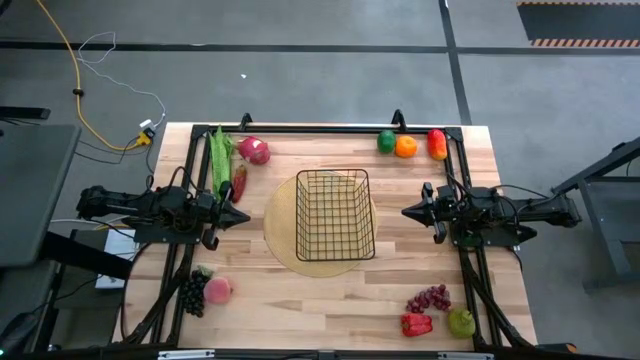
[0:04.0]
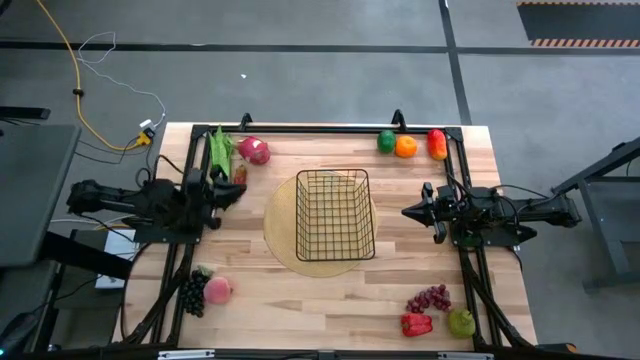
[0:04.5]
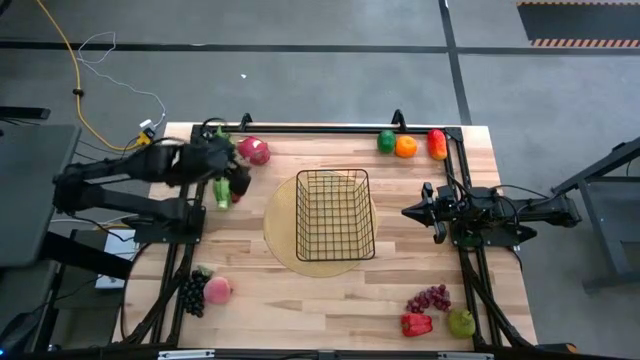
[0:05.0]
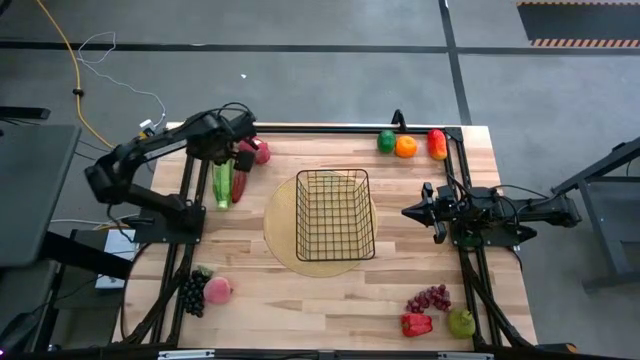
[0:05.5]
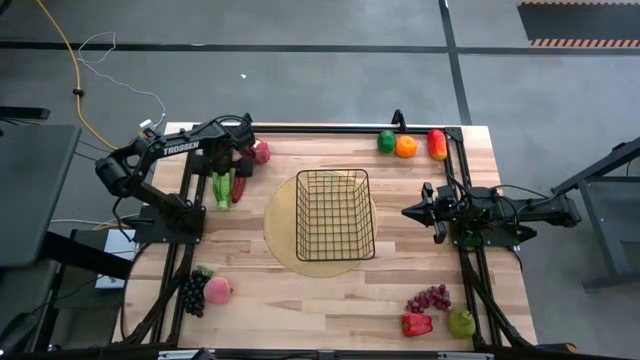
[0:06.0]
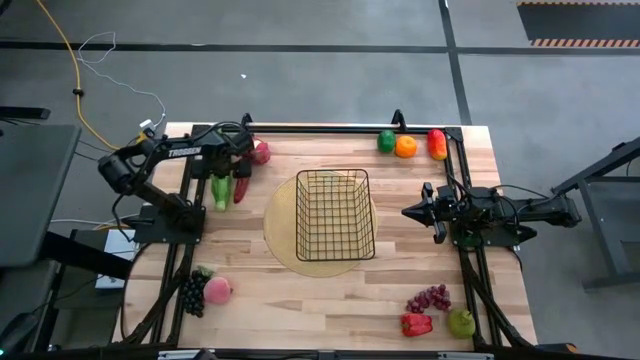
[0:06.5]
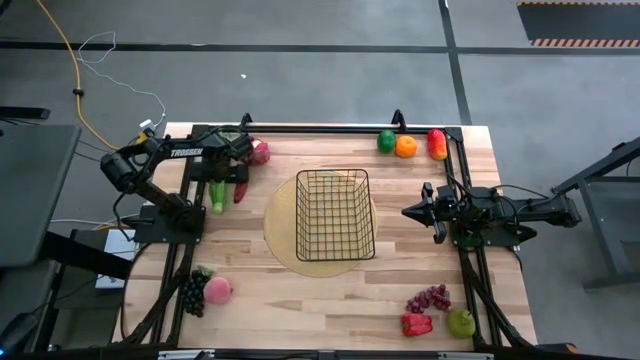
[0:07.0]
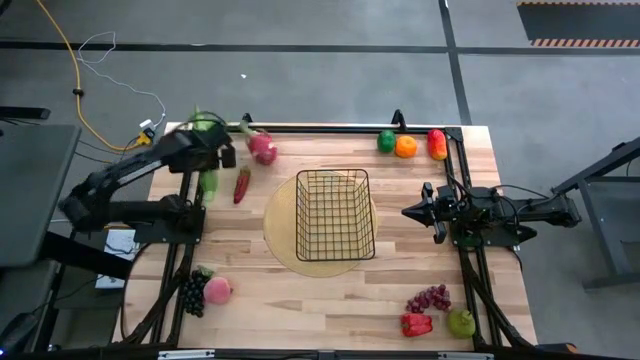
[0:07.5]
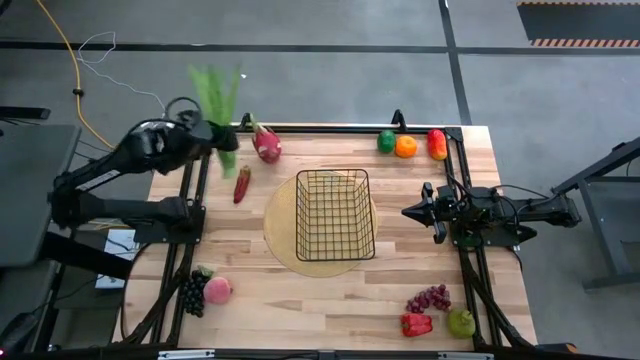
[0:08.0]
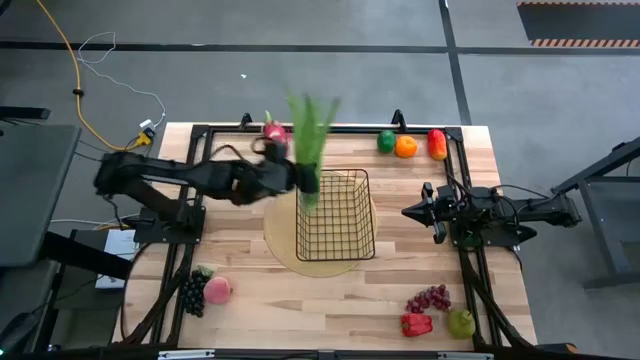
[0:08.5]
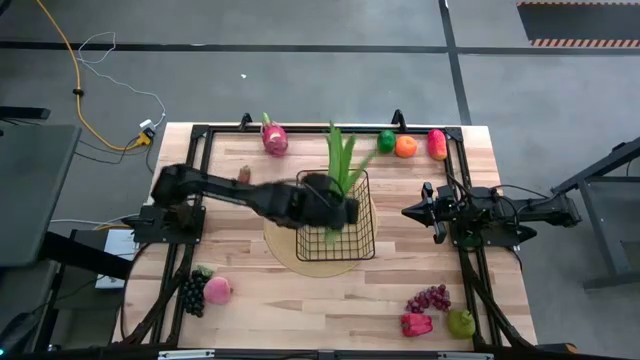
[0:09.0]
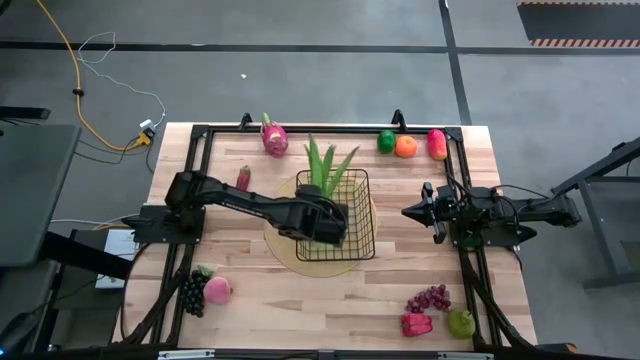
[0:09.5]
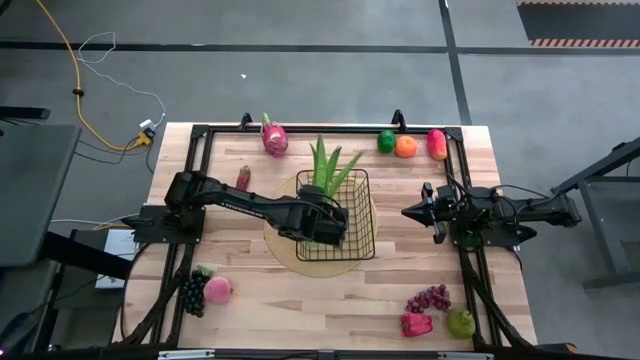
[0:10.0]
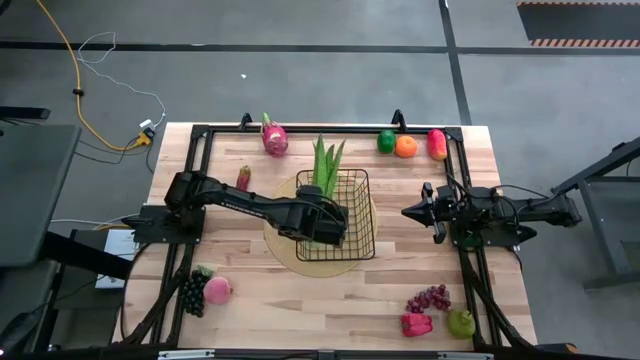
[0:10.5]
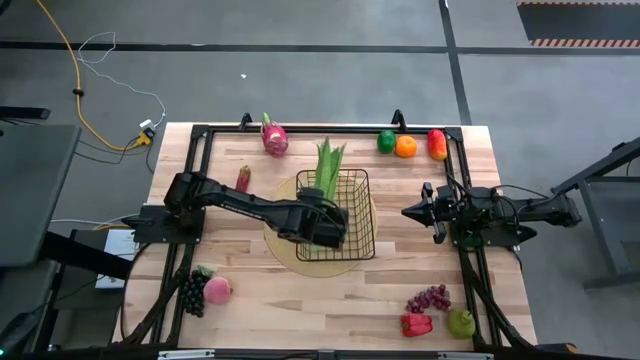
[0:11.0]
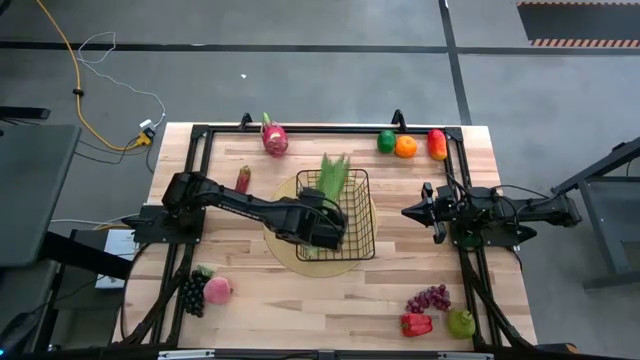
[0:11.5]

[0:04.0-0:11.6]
Task: Build produce basket
Put the leaf lettuce into the wire basket

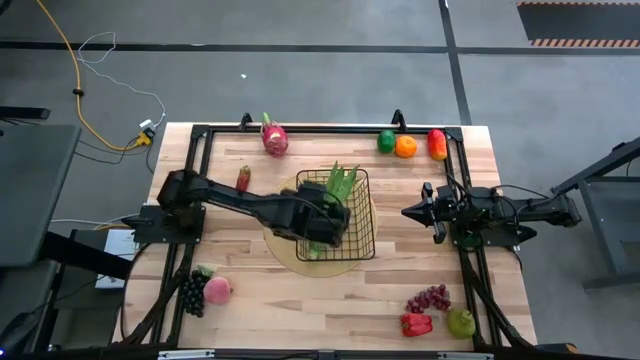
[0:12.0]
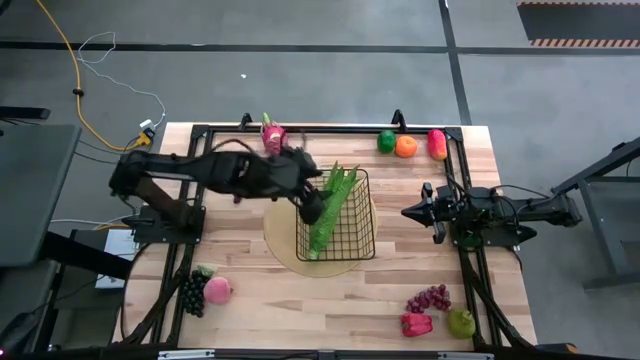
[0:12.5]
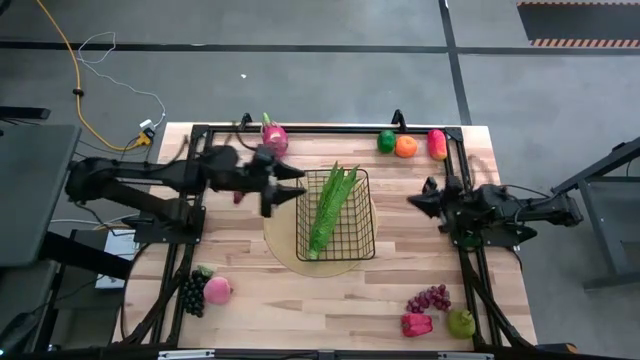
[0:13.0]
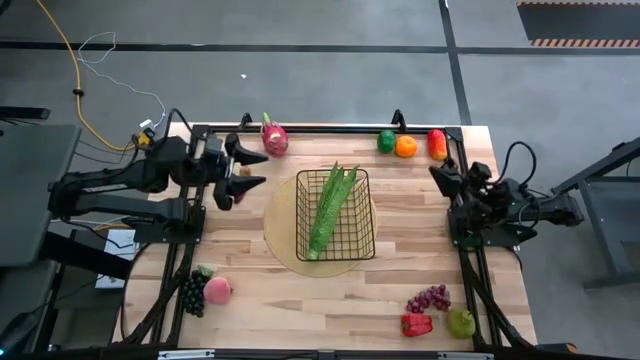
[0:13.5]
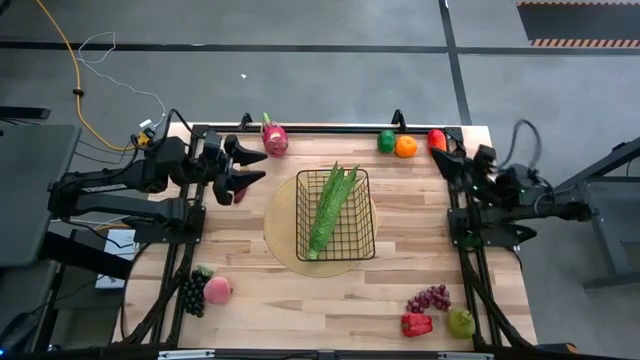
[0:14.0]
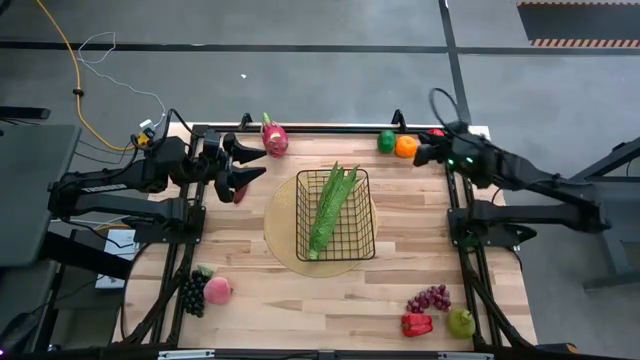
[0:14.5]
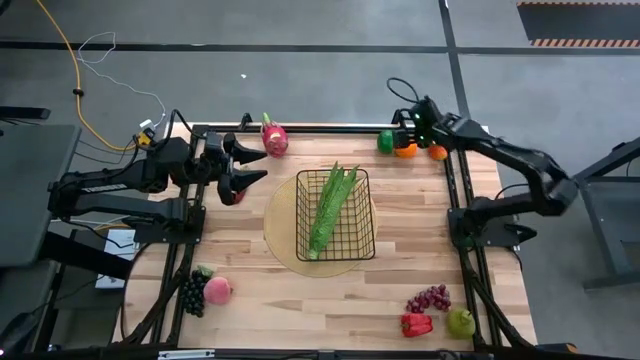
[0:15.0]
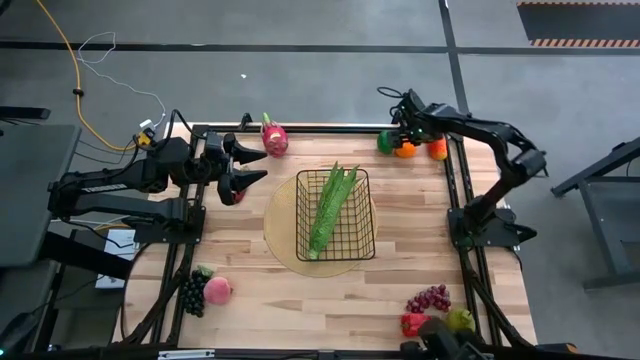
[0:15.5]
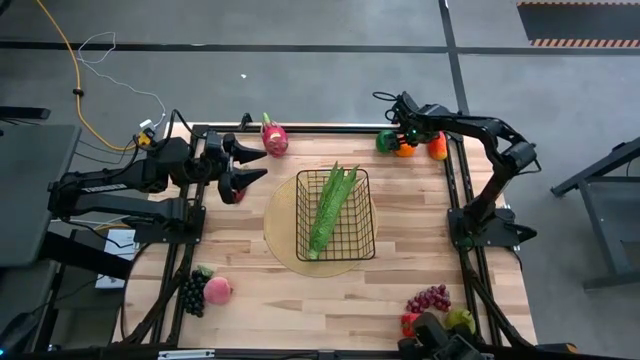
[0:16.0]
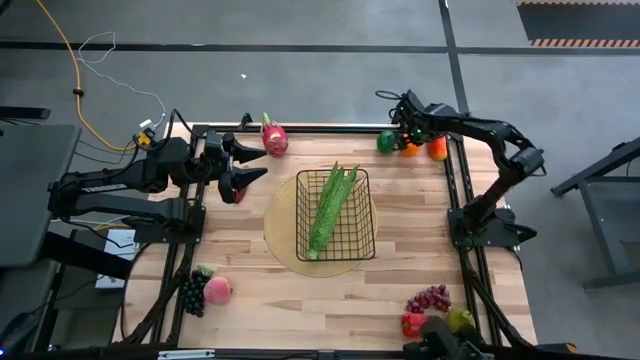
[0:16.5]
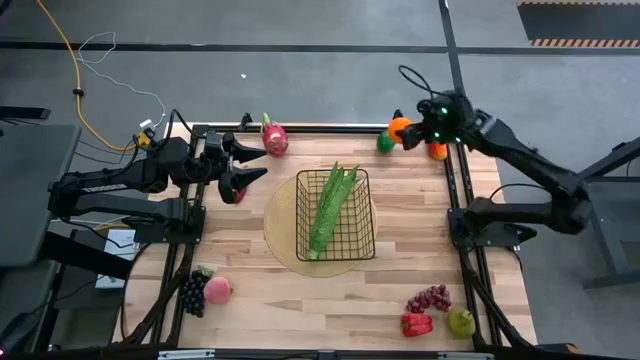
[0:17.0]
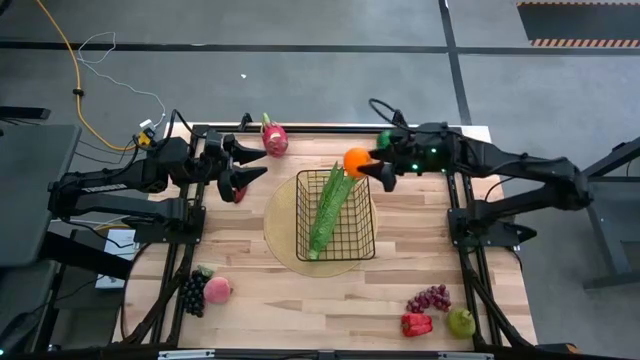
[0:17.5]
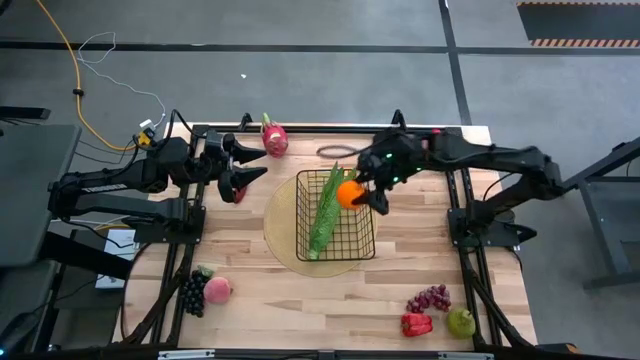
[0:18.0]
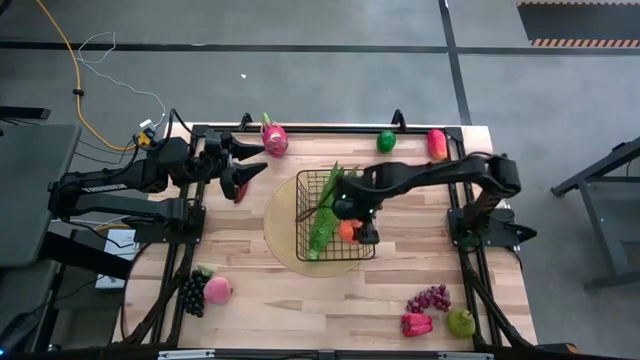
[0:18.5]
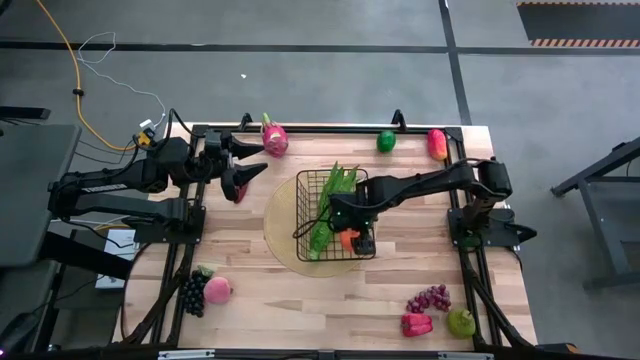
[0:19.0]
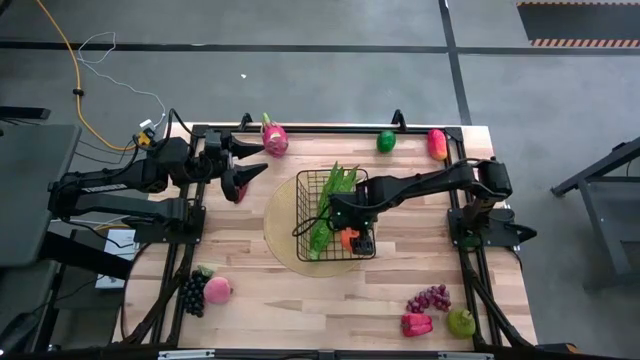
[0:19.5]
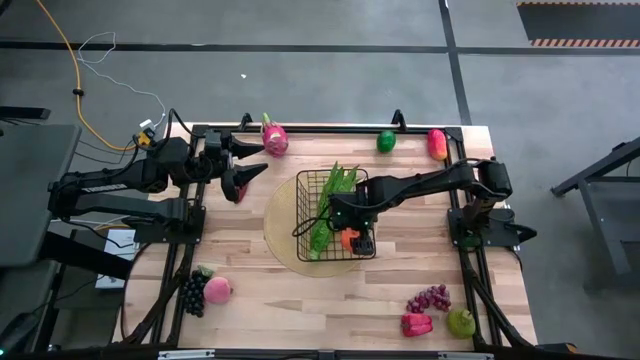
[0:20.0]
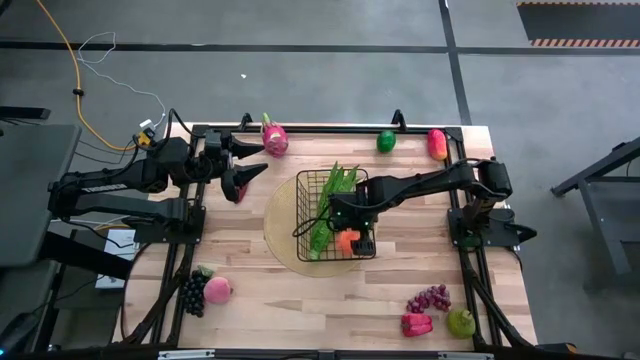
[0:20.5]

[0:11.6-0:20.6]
Put the orange into the wire basket

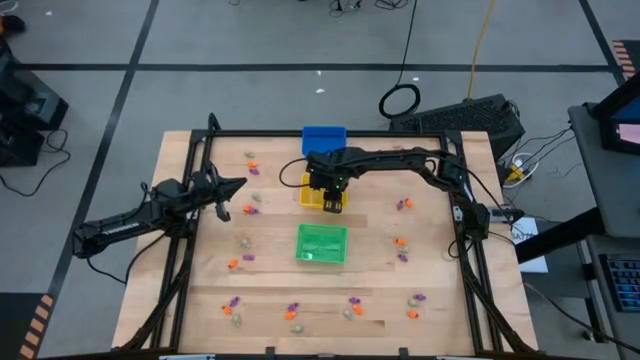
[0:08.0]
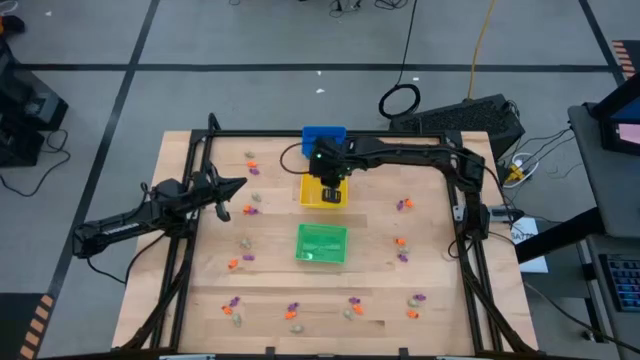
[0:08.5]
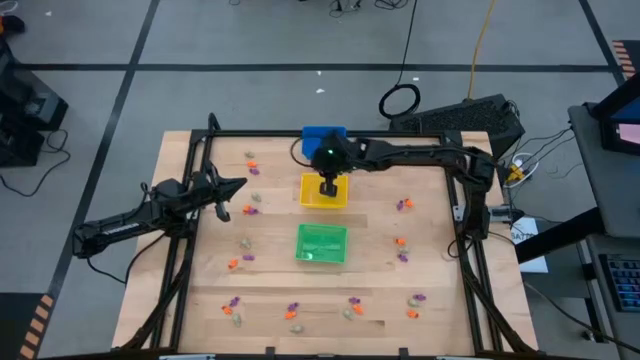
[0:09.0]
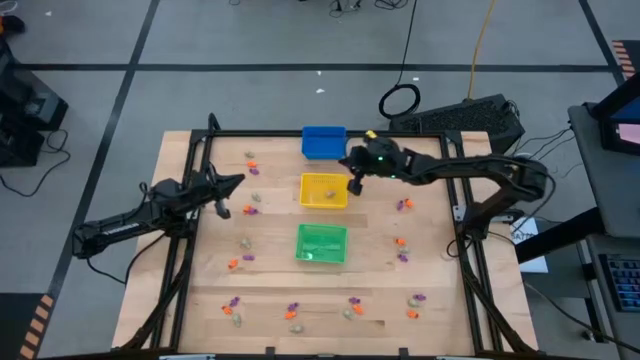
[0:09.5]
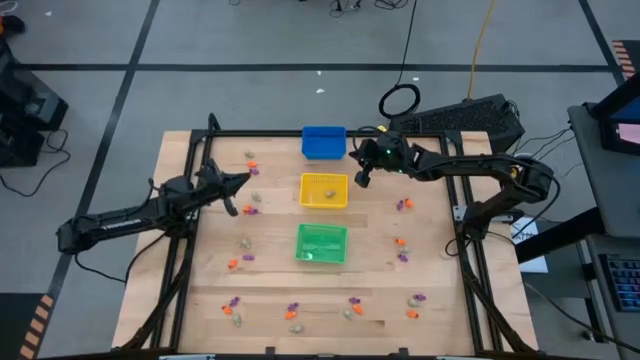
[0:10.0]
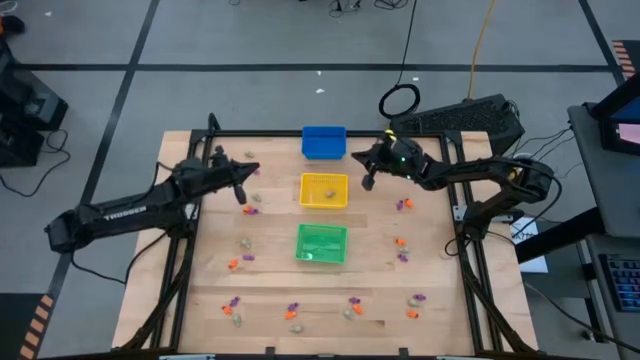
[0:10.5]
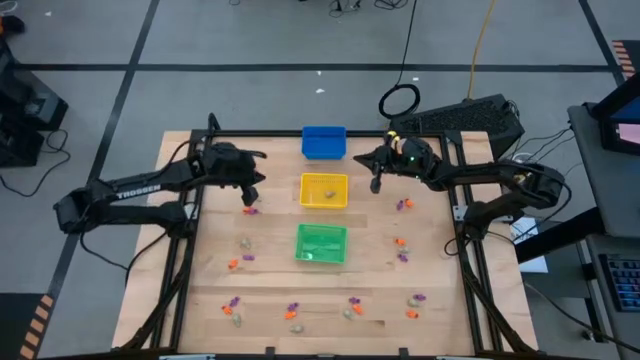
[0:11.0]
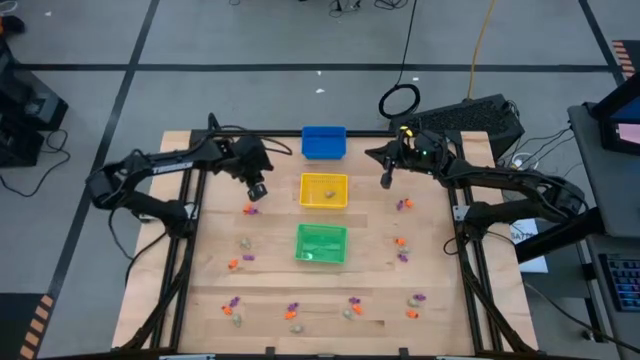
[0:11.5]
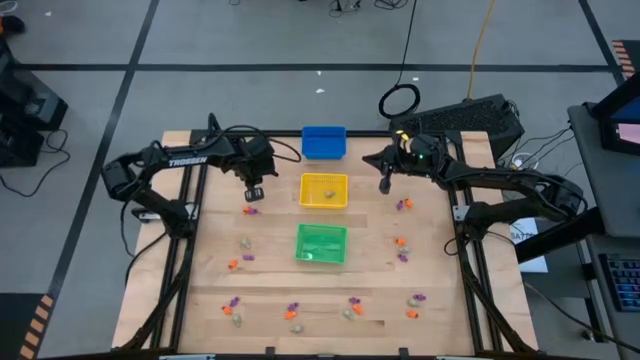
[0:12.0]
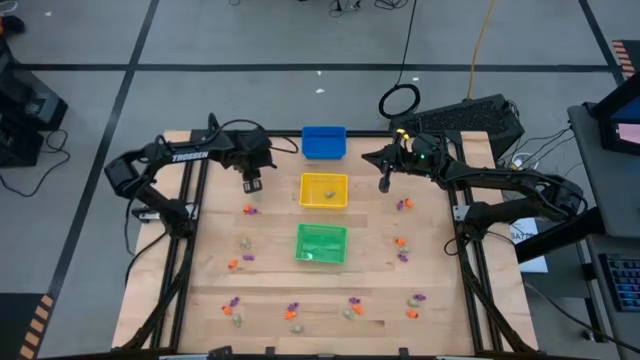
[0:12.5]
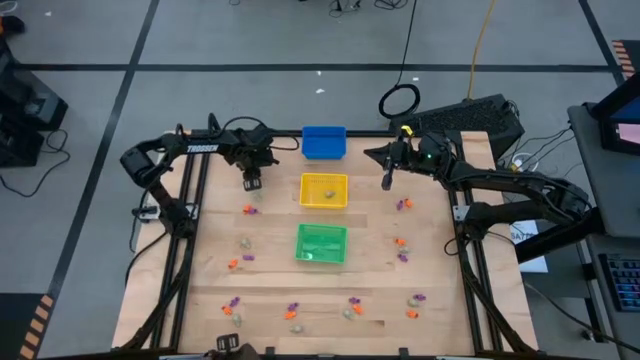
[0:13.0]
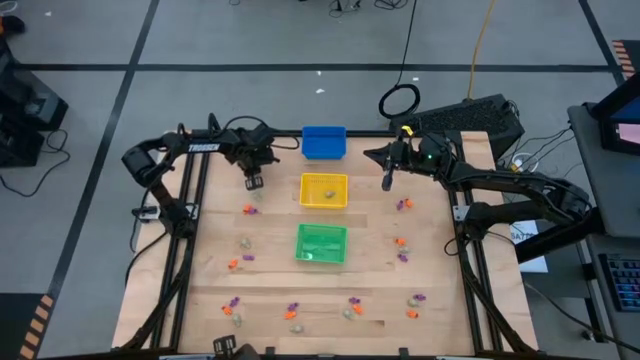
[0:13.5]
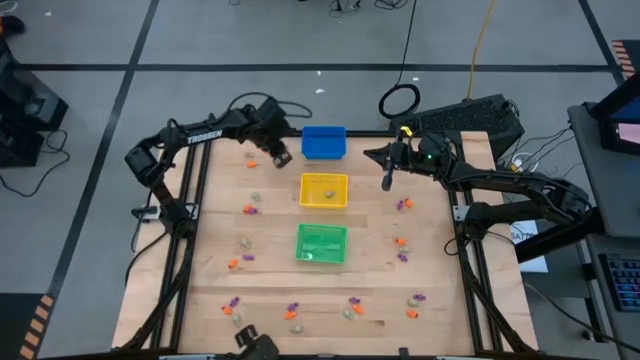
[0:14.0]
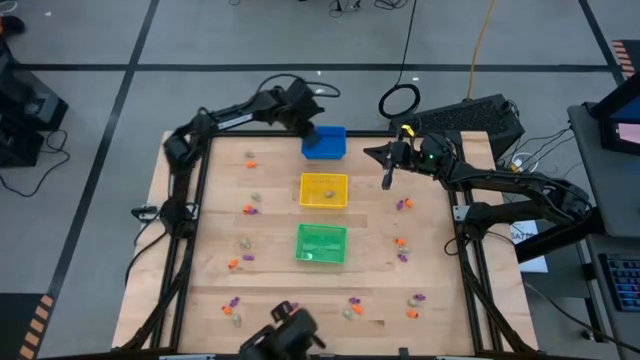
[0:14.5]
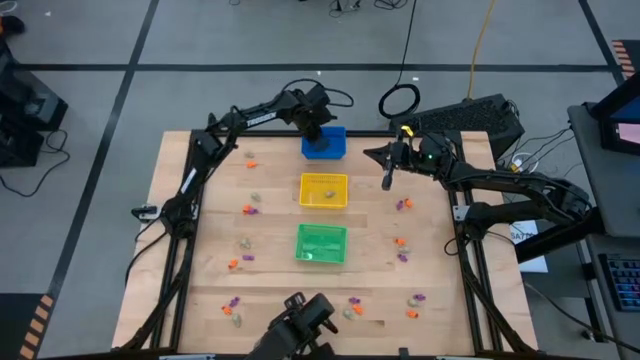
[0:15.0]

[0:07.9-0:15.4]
Task: Sort Halloween decoration
Put the purple skeleton toy into the blue bin
